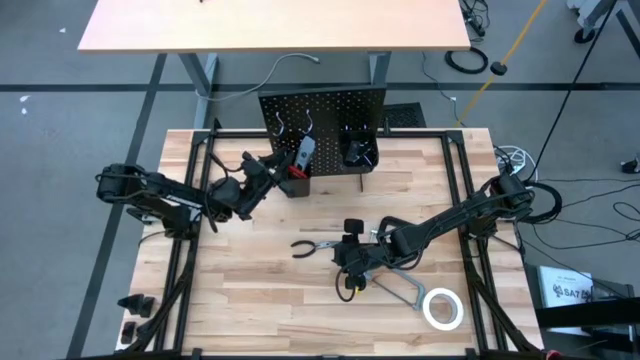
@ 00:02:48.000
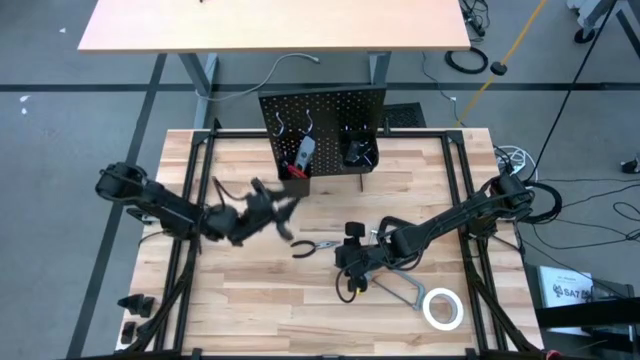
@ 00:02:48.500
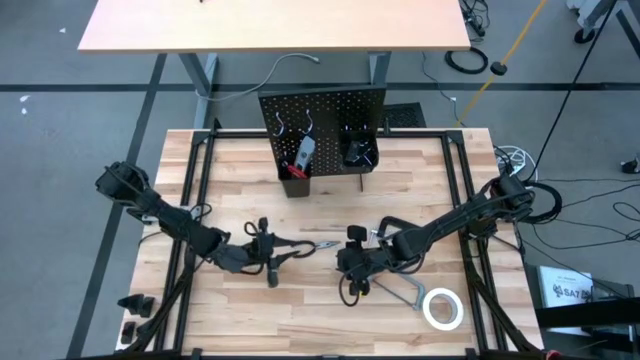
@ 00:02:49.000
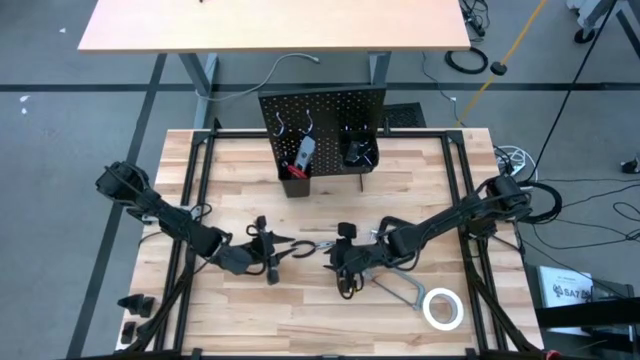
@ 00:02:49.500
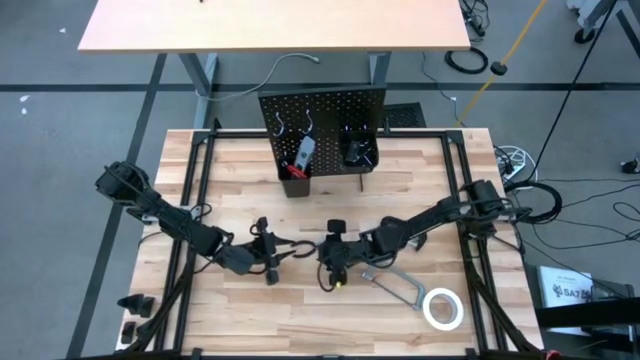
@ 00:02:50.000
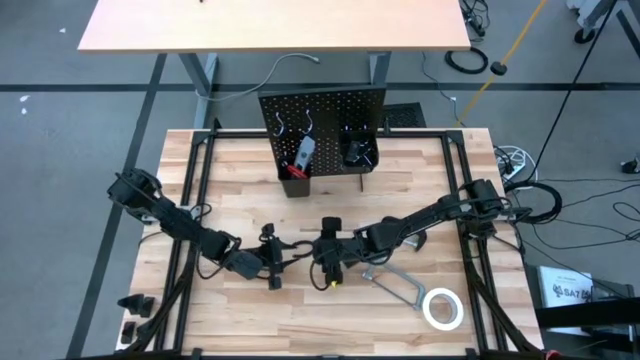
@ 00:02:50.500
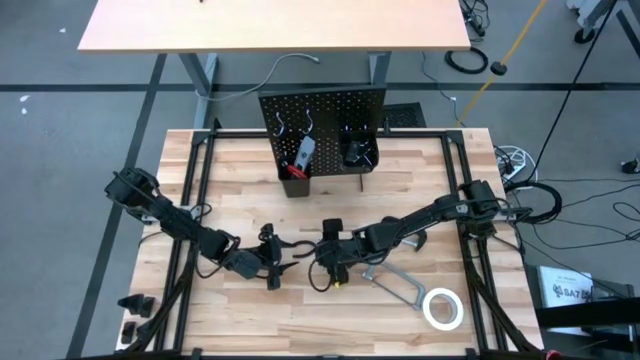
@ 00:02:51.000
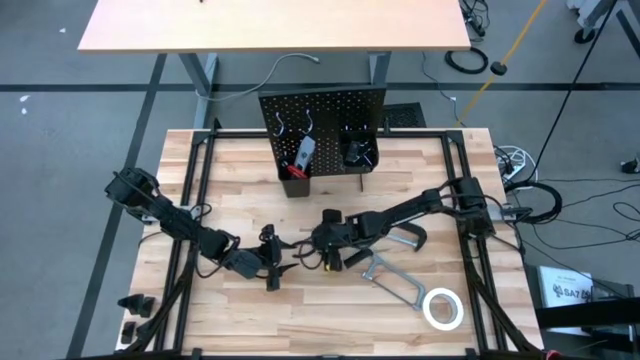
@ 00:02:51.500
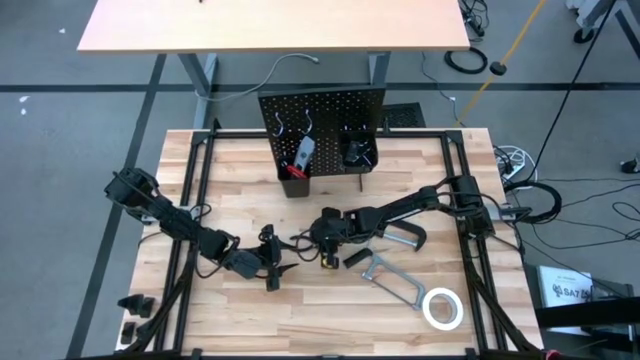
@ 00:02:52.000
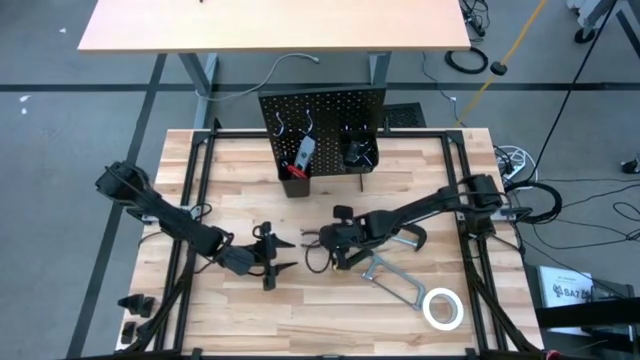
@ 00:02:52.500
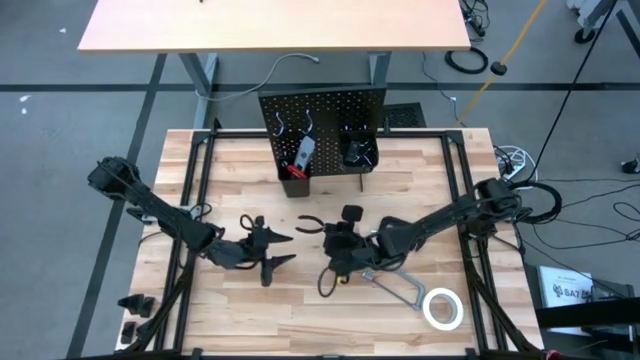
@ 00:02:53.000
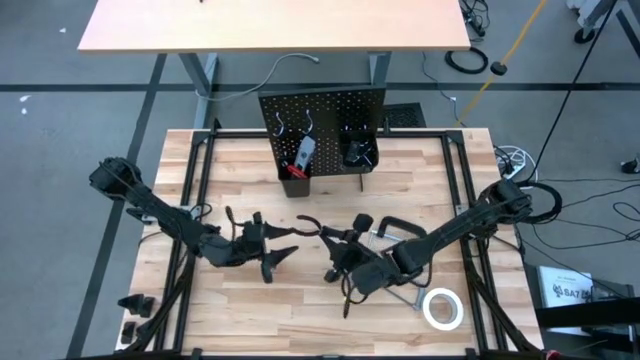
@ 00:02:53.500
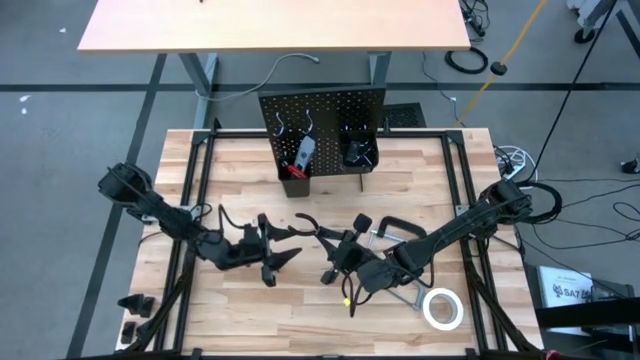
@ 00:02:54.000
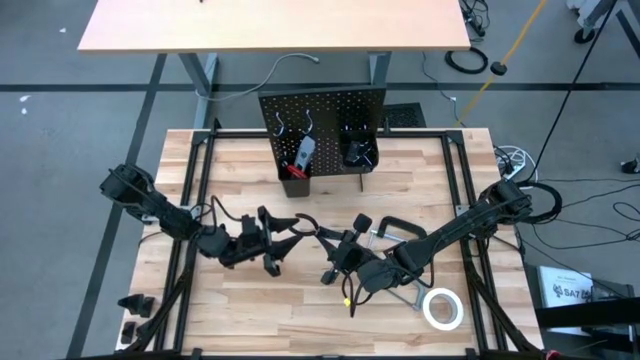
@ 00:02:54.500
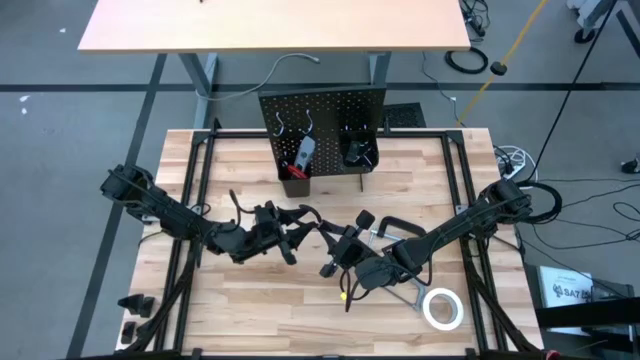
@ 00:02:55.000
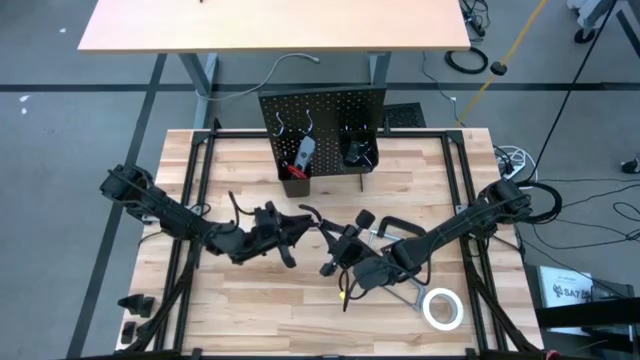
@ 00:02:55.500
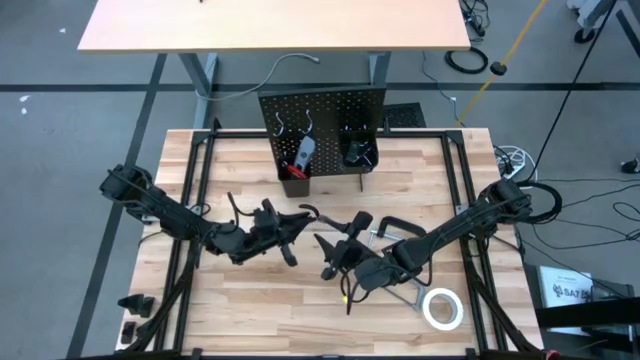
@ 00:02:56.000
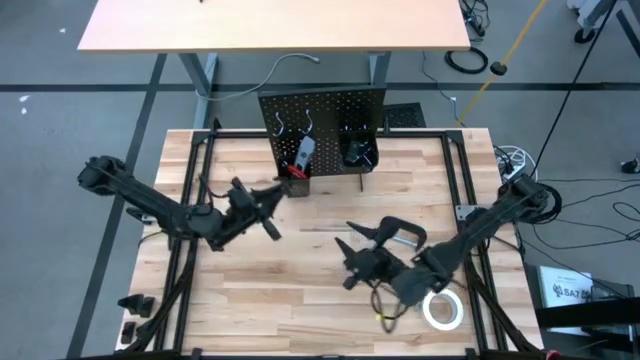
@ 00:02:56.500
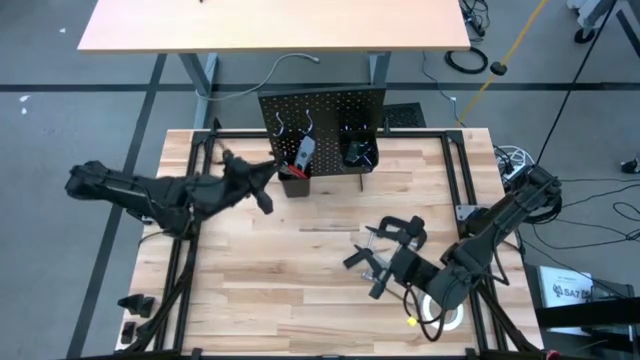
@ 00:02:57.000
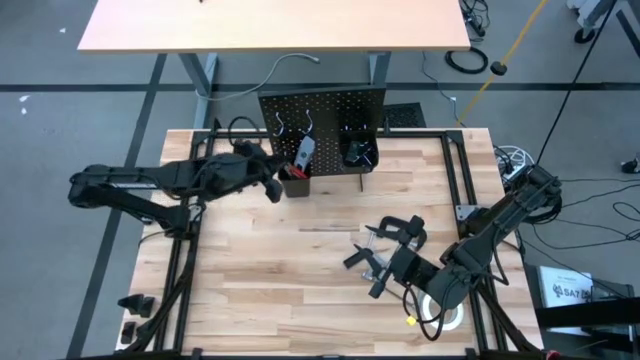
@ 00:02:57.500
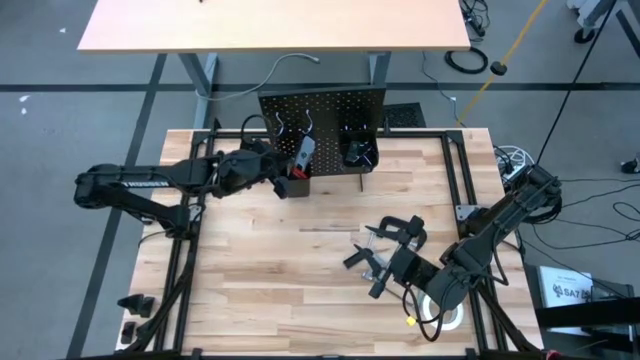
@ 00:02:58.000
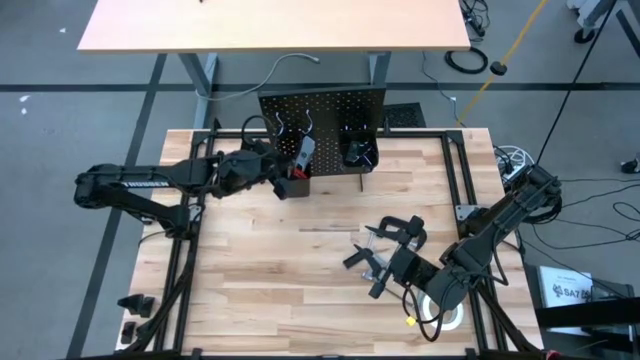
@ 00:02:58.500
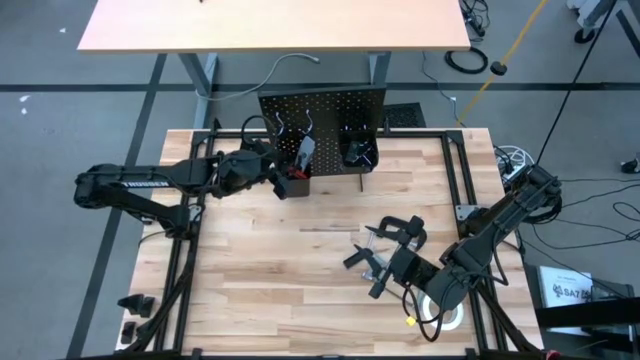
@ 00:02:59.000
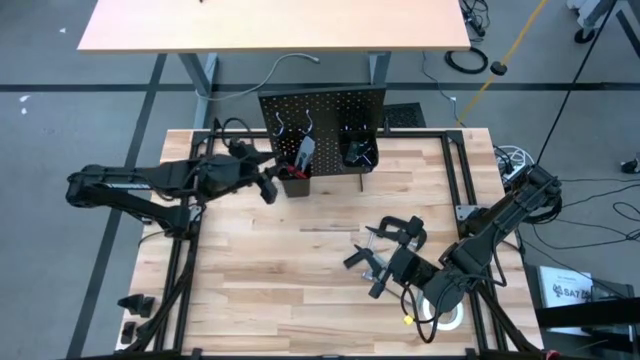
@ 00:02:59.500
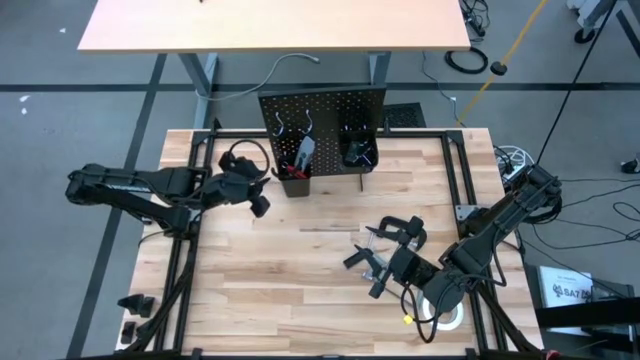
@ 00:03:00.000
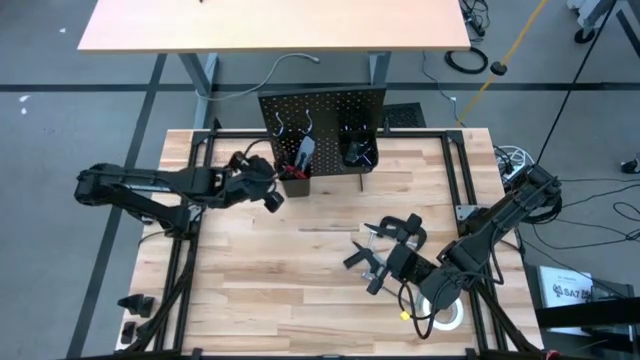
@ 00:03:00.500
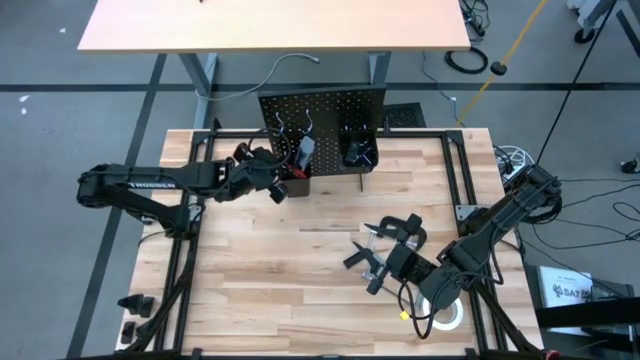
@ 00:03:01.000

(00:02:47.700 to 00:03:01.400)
Task: Hang tools onto peg board
Put the pliers into the left black bin on the pegboard

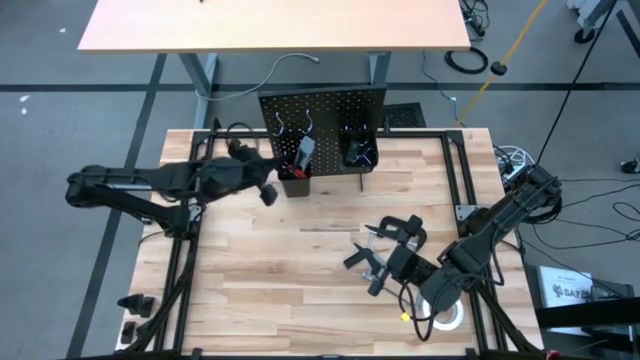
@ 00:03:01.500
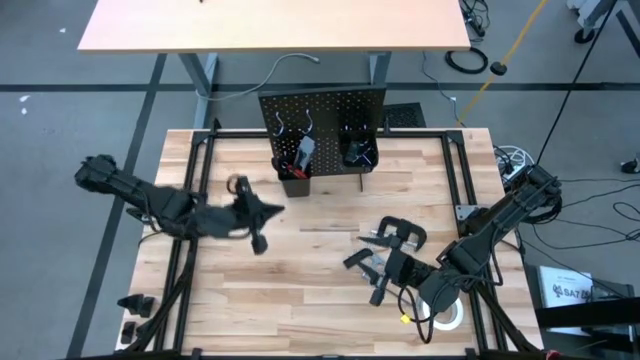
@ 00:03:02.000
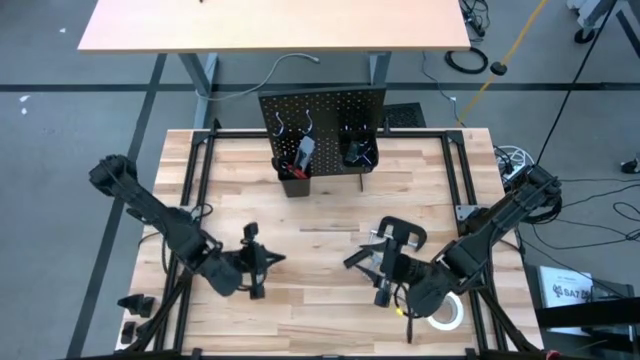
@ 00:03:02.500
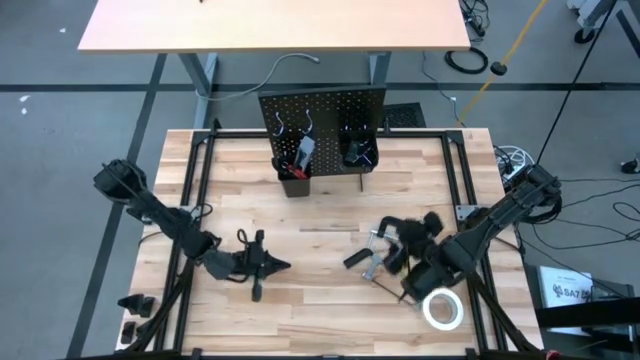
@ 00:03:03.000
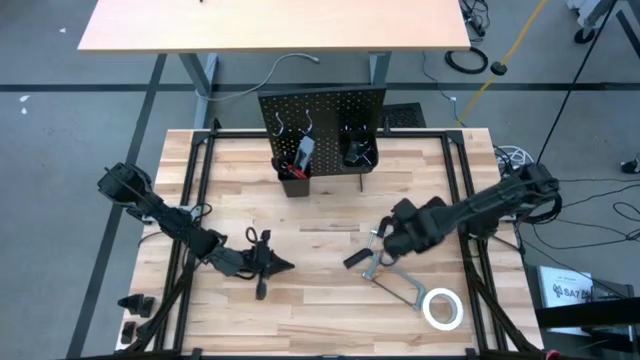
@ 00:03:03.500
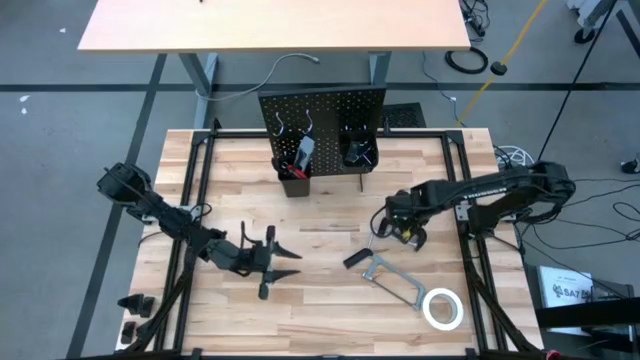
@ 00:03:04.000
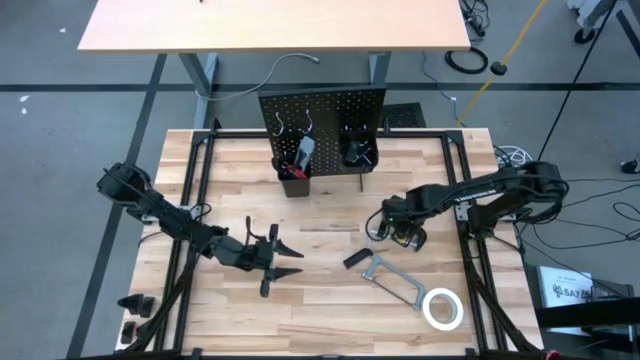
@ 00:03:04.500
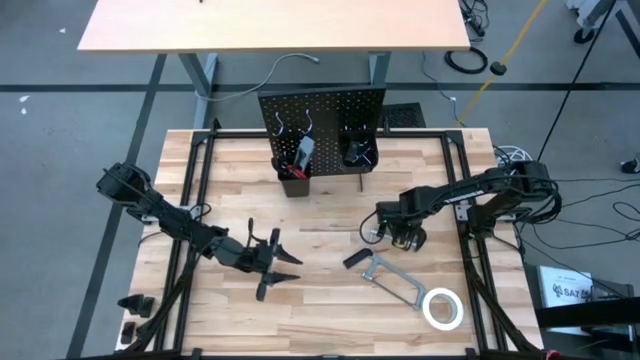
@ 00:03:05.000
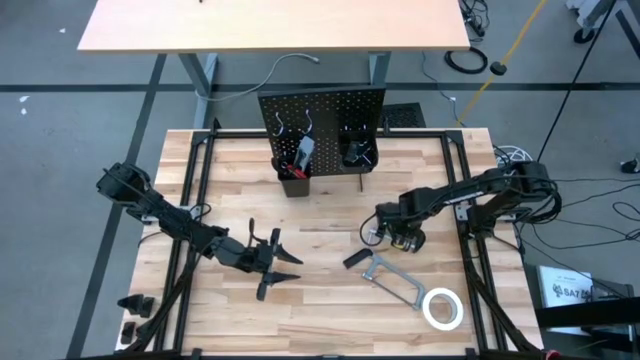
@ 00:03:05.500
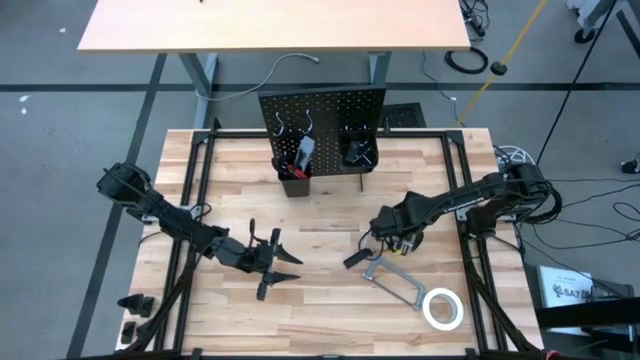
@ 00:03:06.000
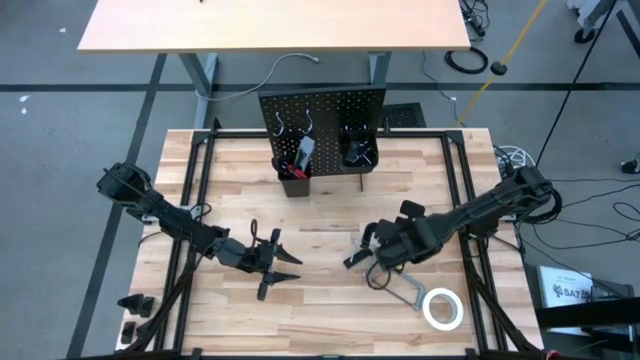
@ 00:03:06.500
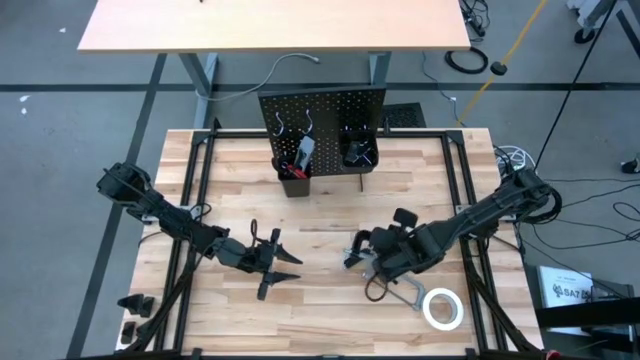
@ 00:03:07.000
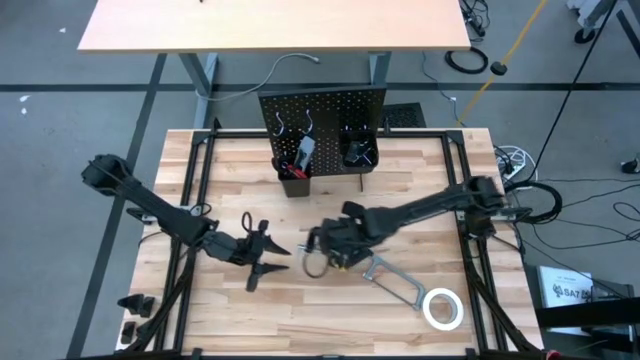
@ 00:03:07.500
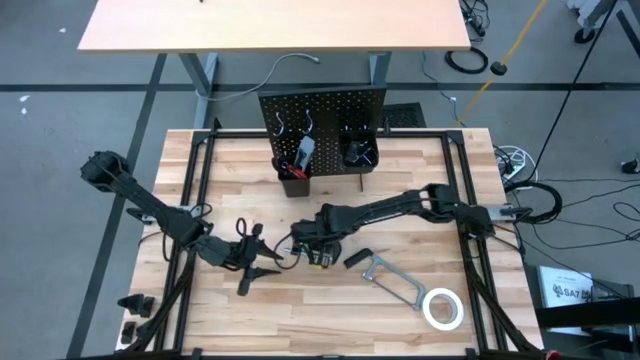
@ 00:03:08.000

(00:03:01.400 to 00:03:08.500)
Move the clamp to the center of the table
